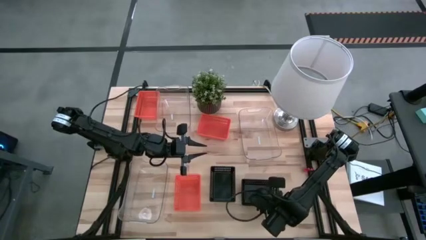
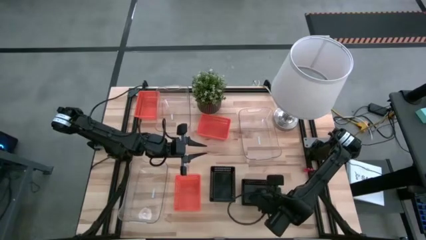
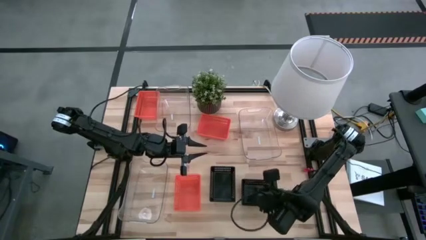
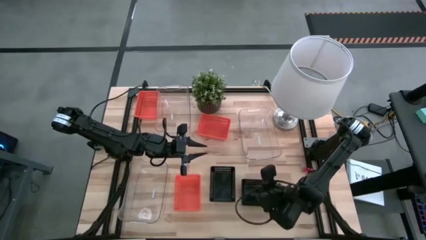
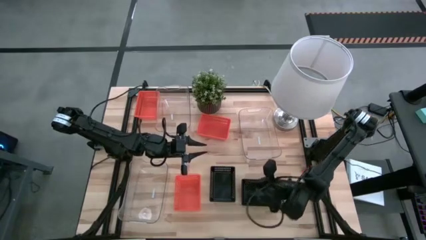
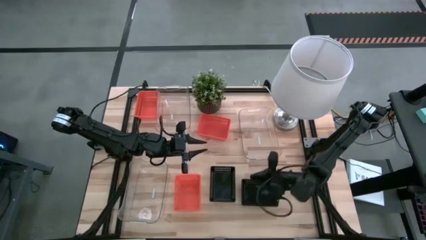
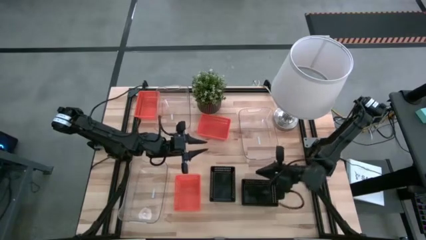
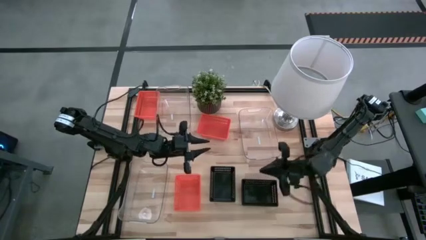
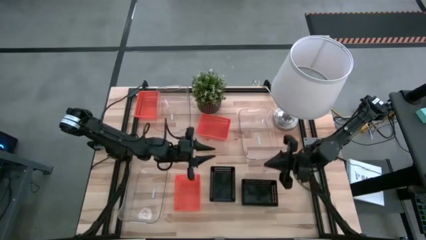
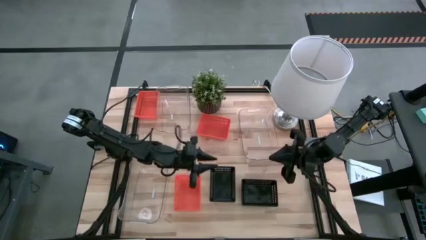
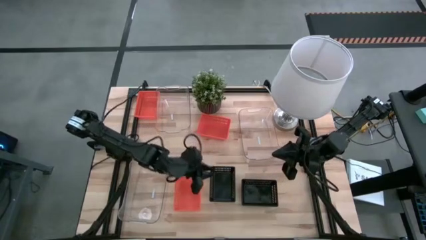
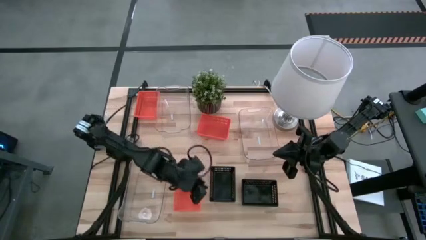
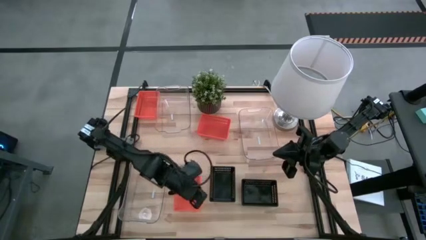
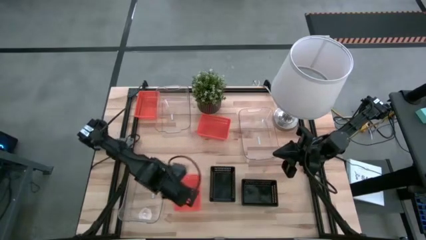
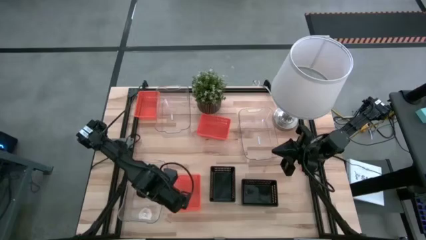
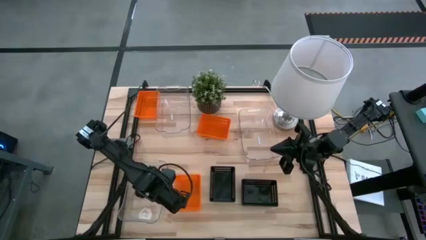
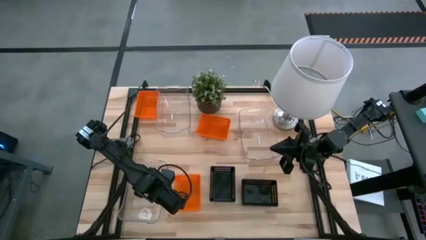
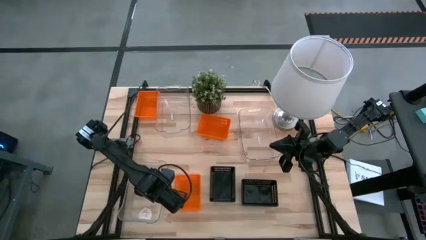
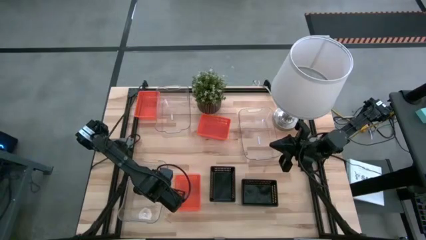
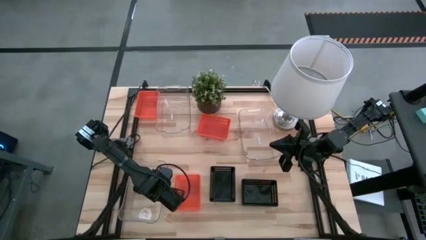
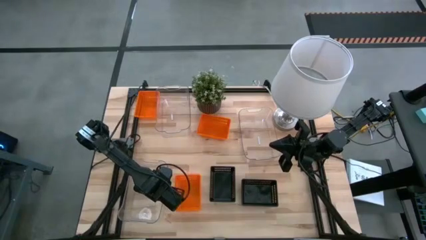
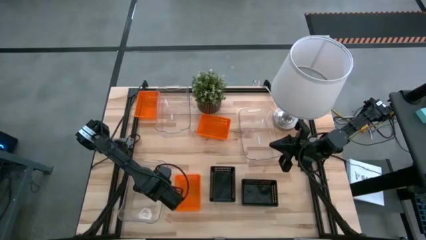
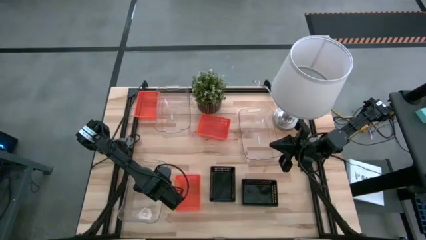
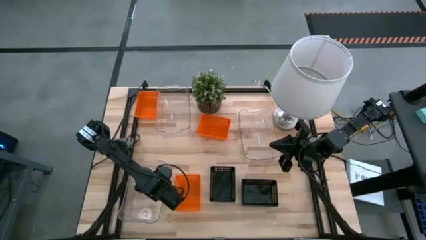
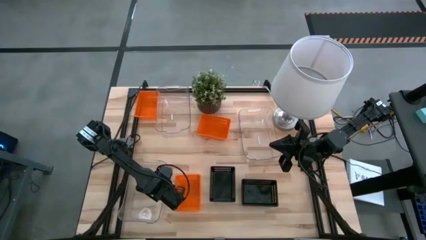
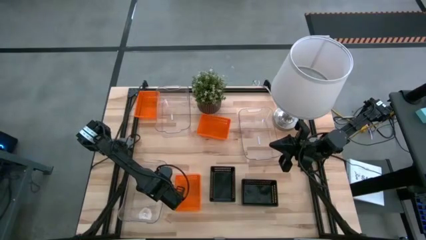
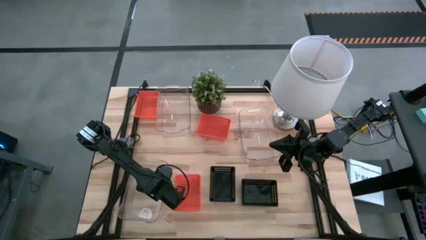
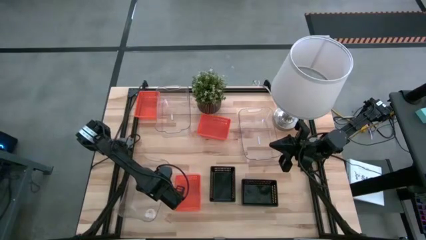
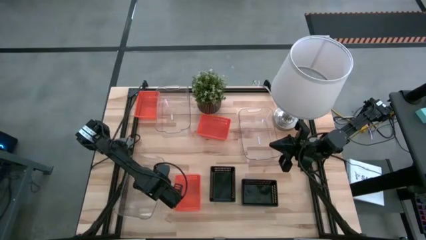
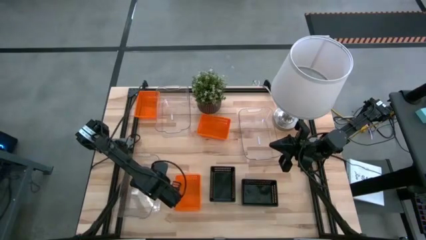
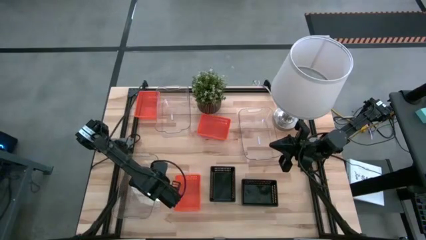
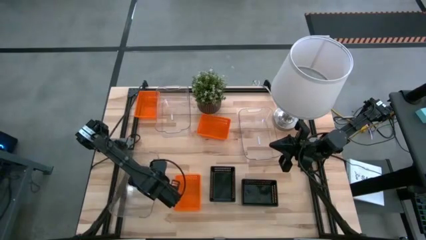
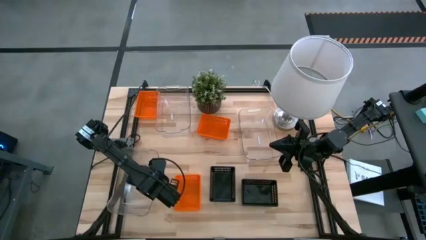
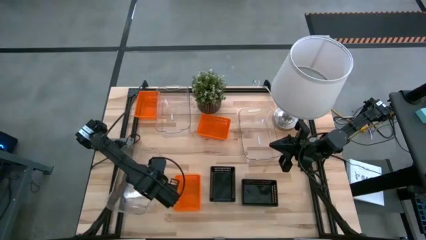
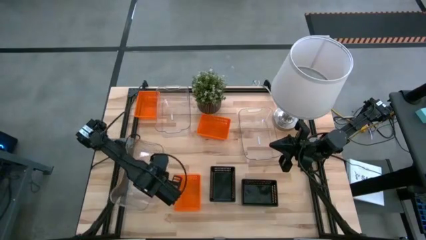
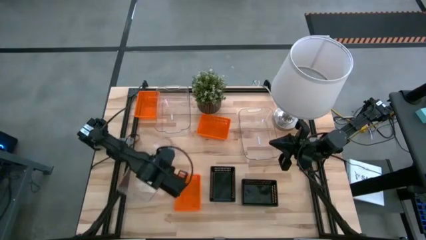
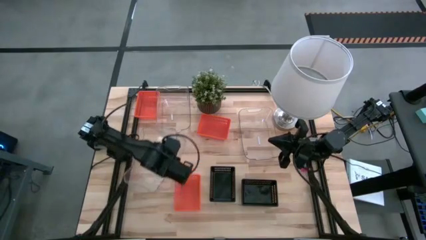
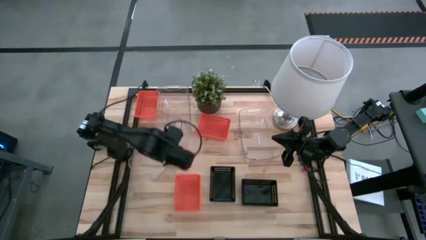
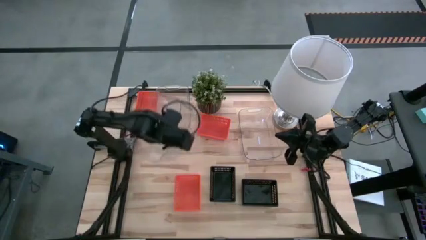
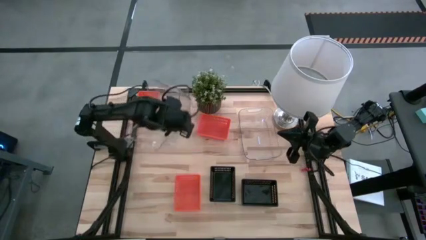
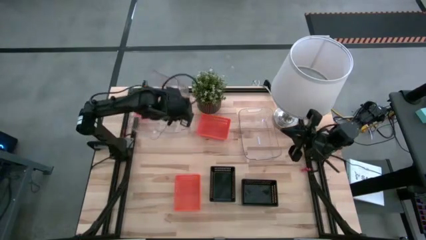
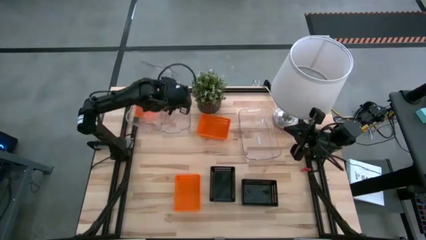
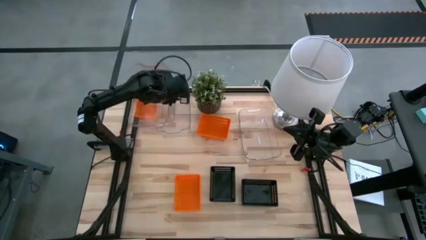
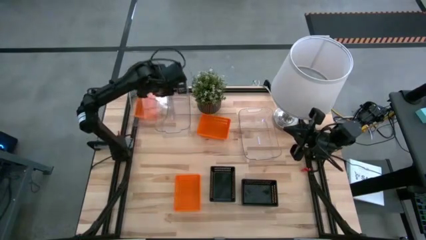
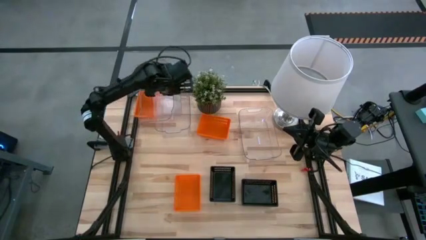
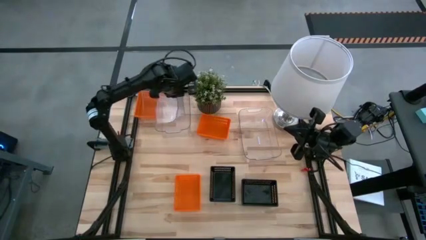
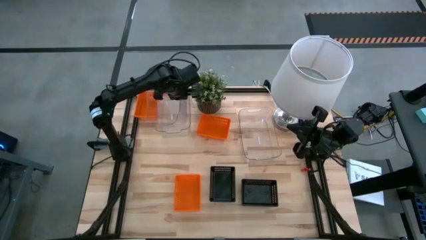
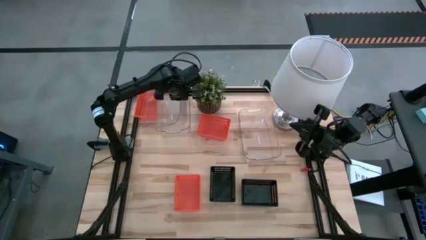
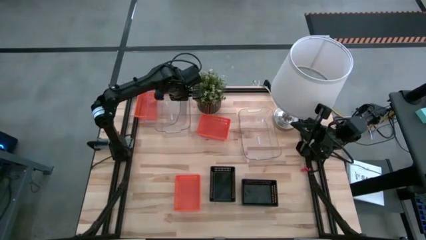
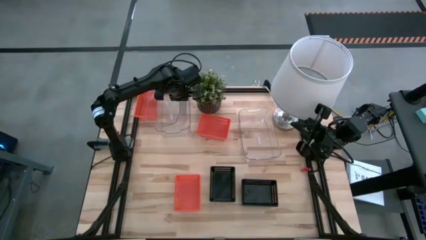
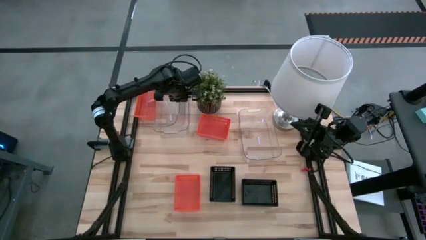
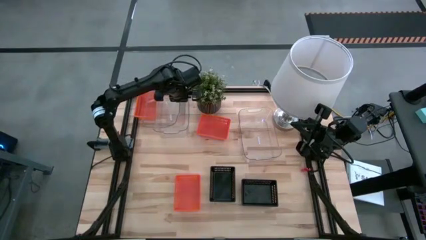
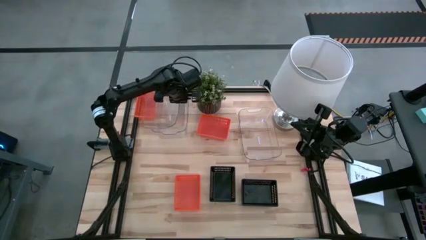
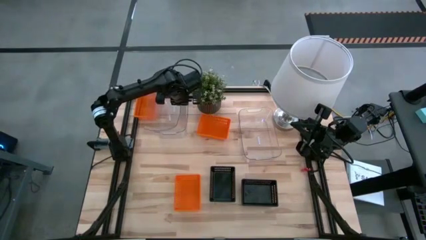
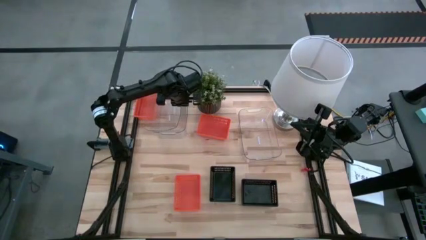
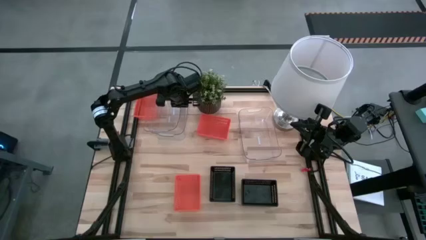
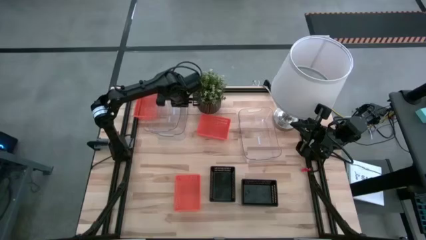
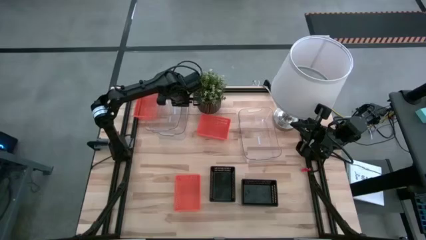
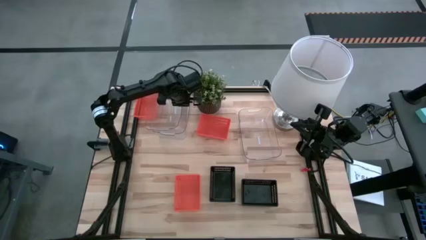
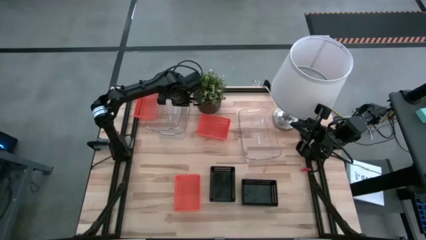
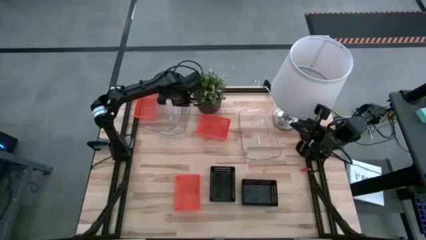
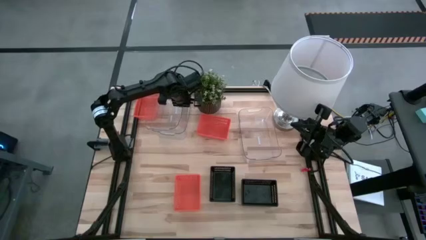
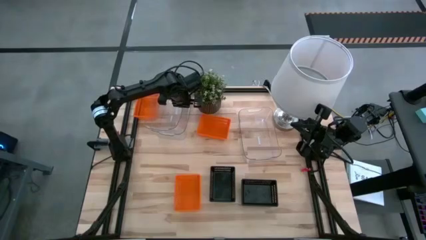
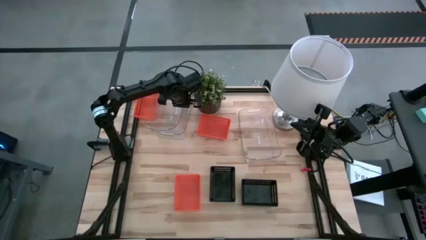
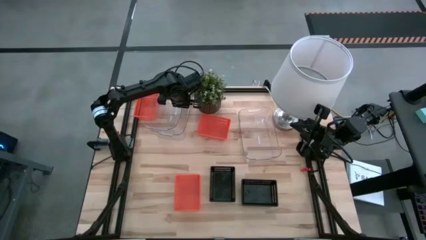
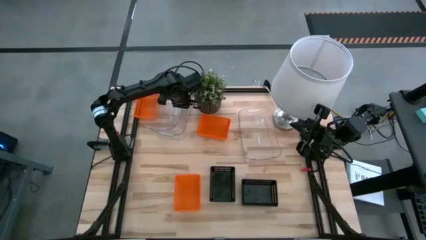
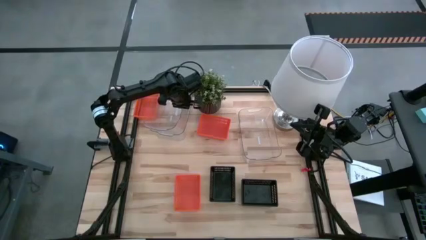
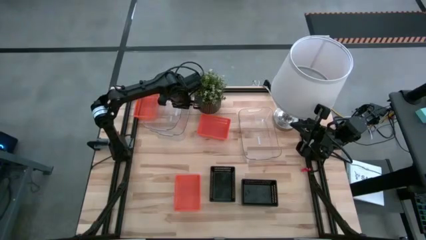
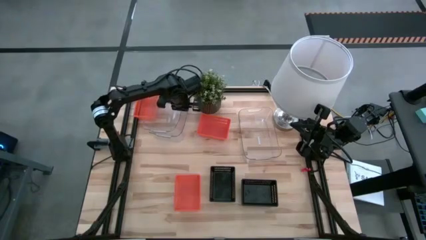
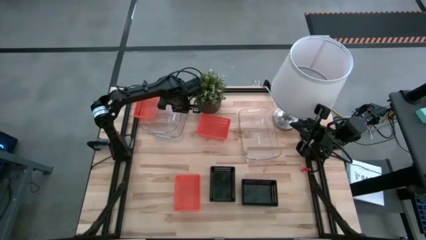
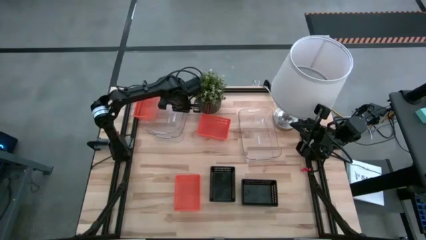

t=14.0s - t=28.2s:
Stack the bottom transparent bin on the top transparent bin

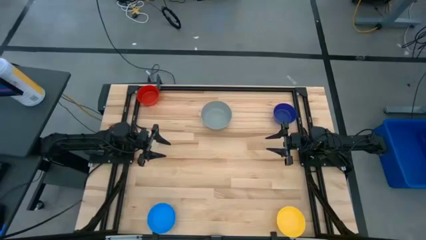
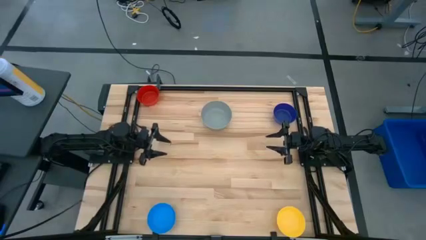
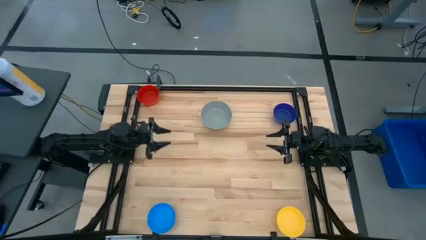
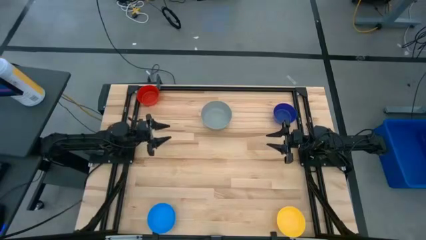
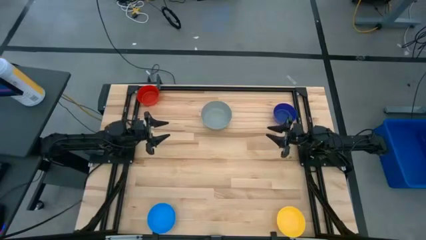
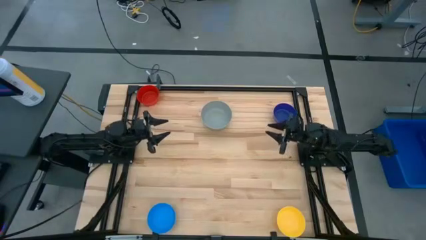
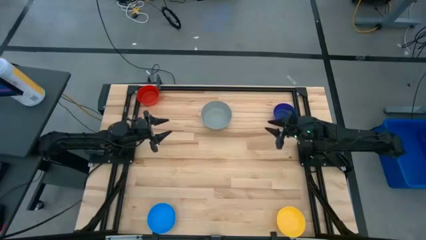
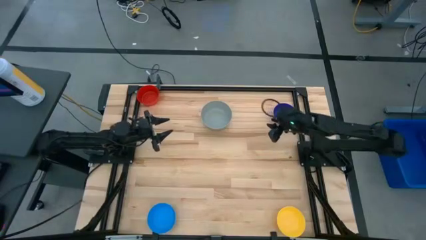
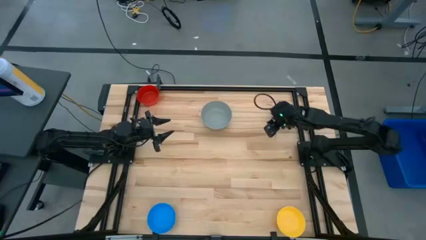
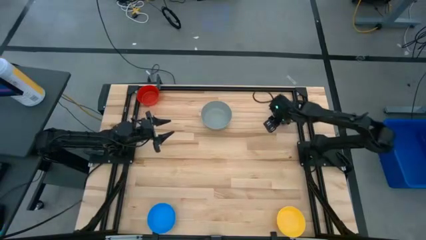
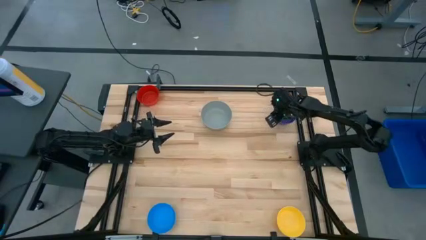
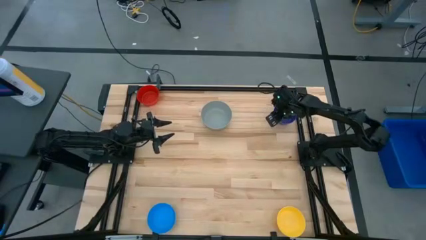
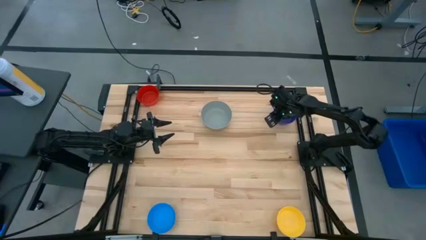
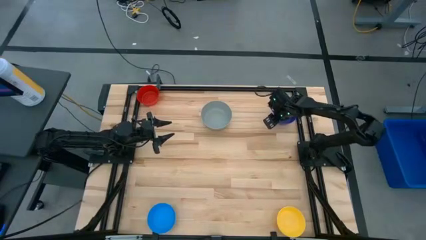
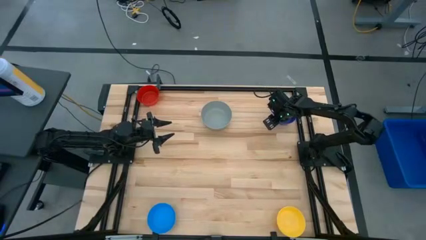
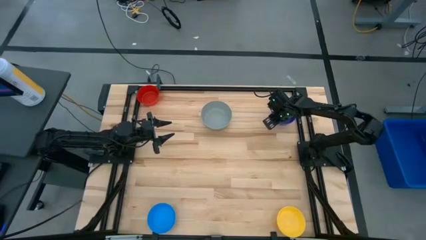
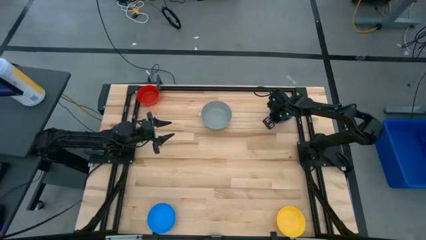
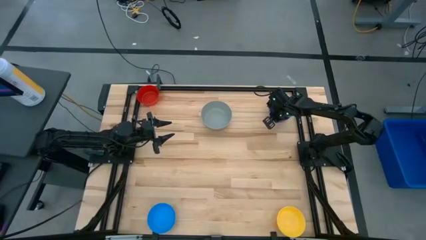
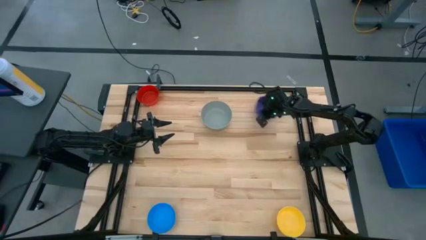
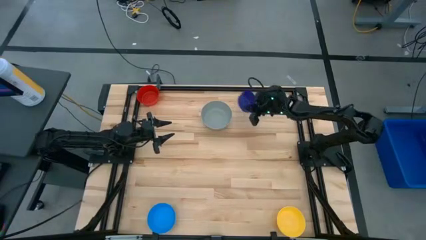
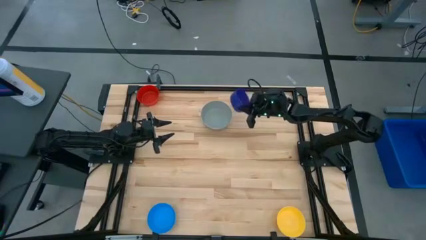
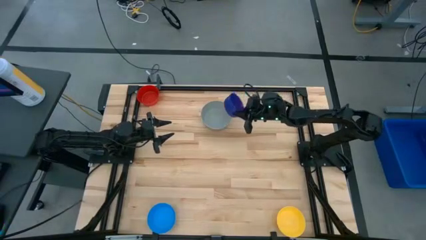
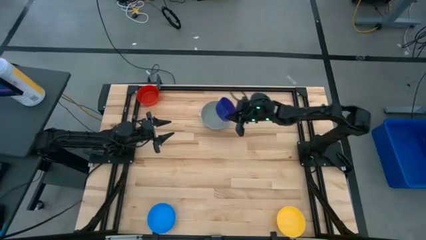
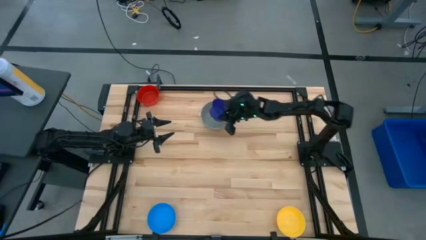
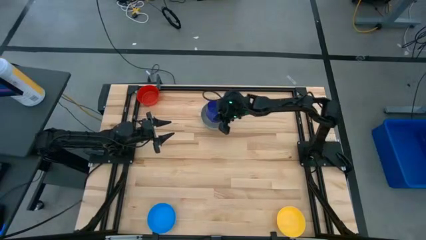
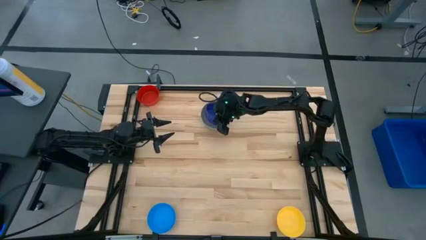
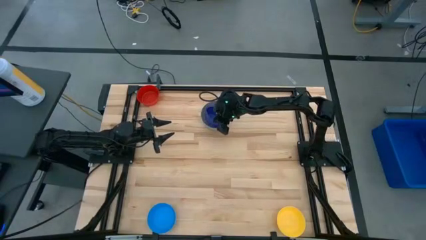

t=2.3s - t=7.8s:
Stack the blue bowl on top of the gray bowl
